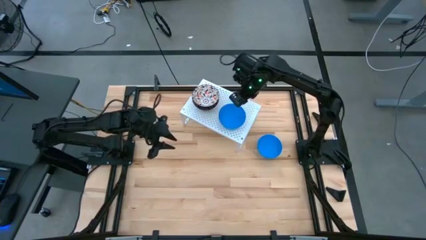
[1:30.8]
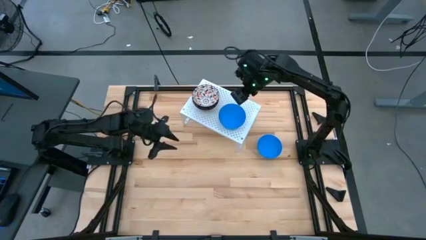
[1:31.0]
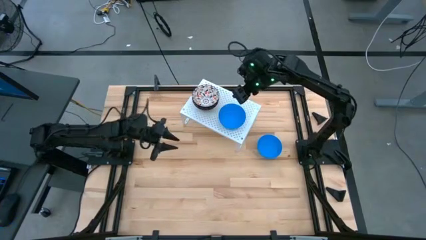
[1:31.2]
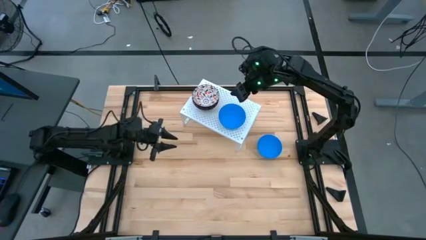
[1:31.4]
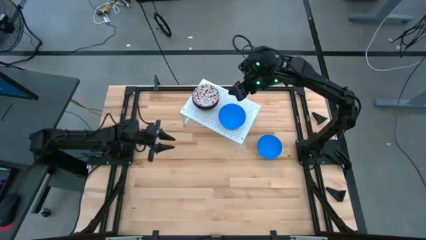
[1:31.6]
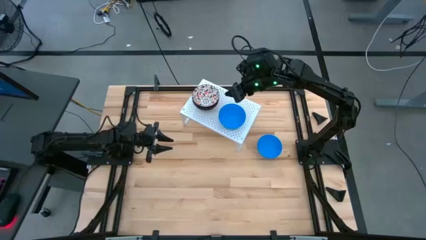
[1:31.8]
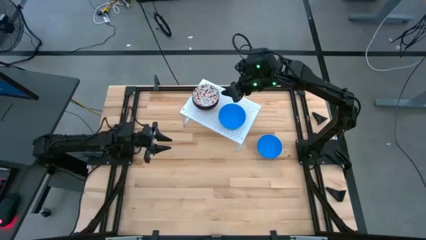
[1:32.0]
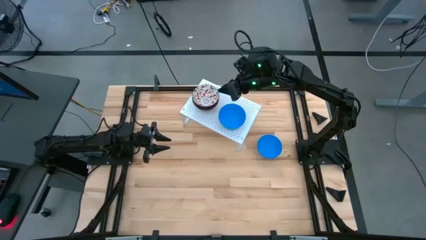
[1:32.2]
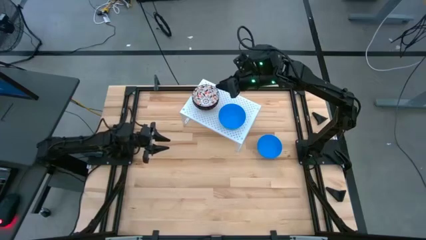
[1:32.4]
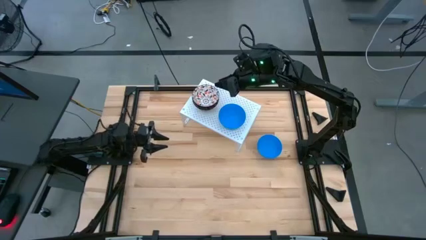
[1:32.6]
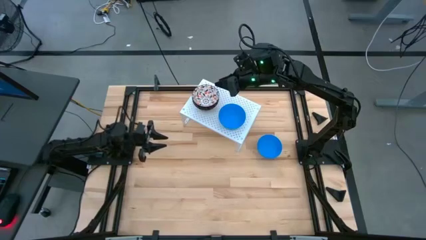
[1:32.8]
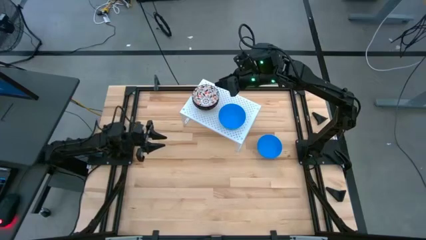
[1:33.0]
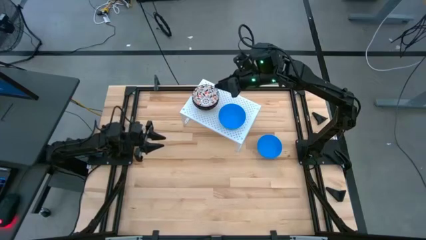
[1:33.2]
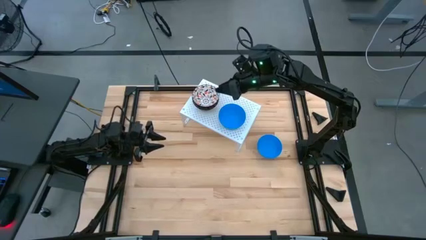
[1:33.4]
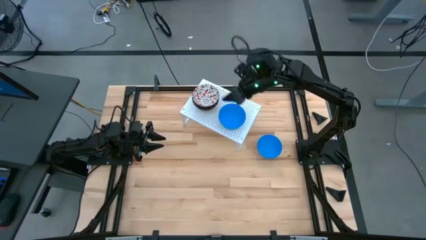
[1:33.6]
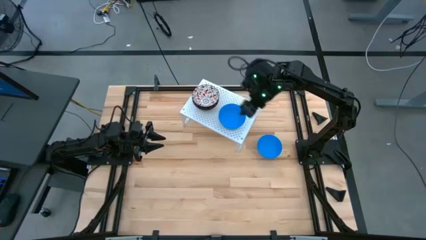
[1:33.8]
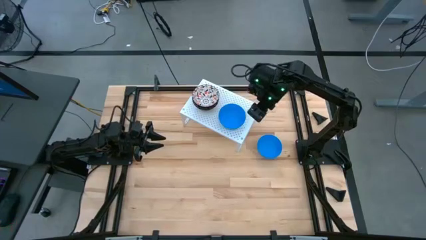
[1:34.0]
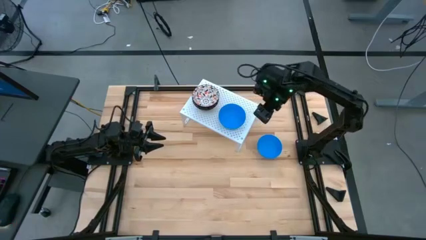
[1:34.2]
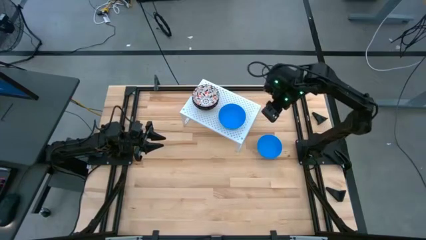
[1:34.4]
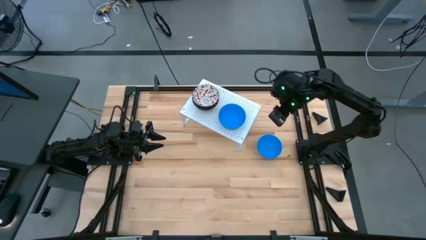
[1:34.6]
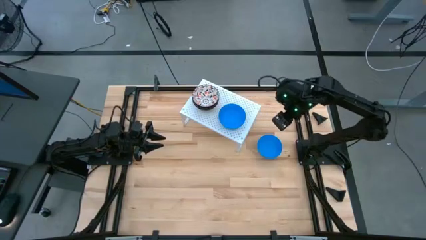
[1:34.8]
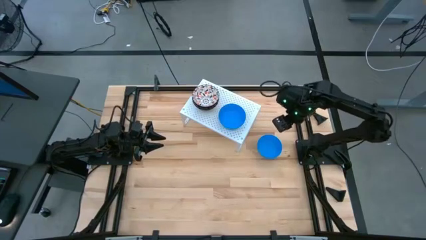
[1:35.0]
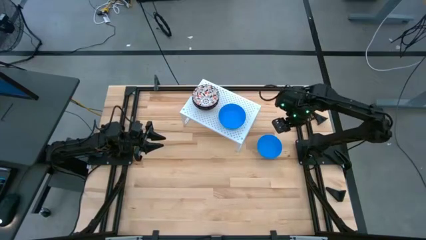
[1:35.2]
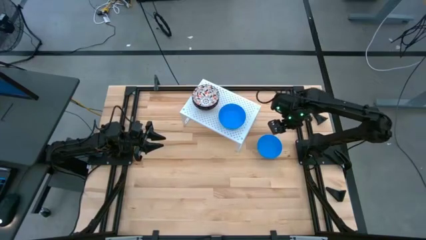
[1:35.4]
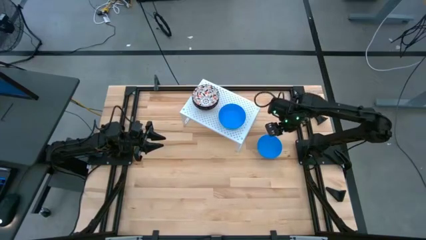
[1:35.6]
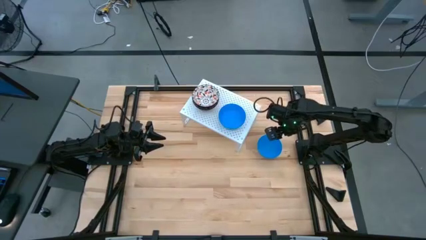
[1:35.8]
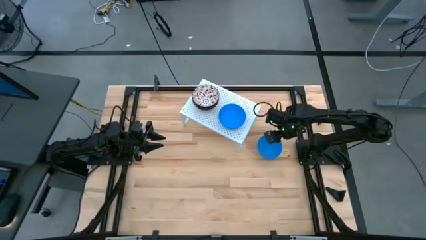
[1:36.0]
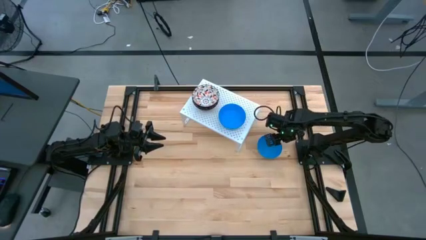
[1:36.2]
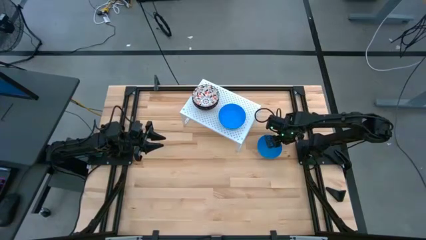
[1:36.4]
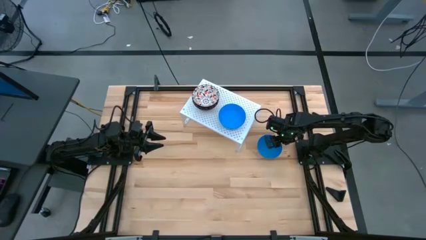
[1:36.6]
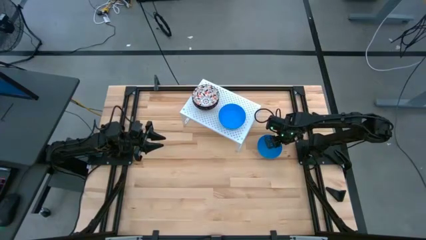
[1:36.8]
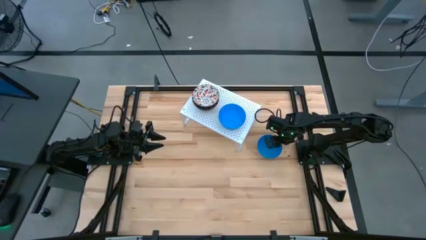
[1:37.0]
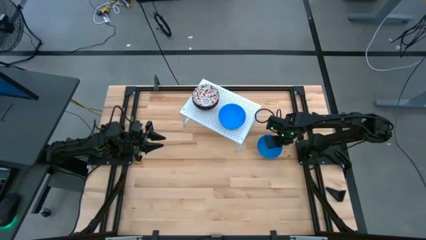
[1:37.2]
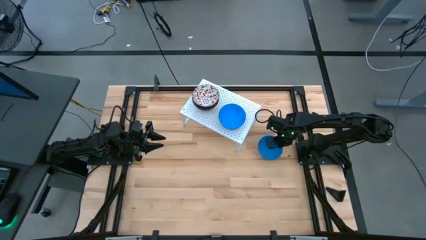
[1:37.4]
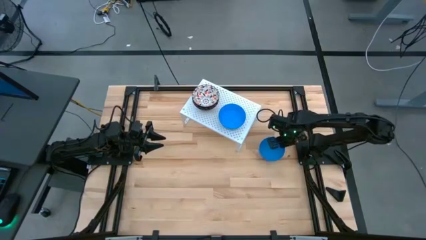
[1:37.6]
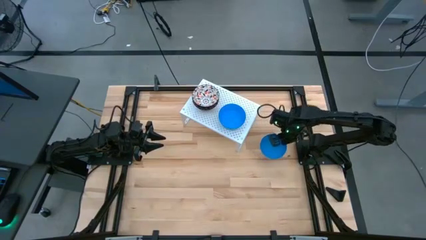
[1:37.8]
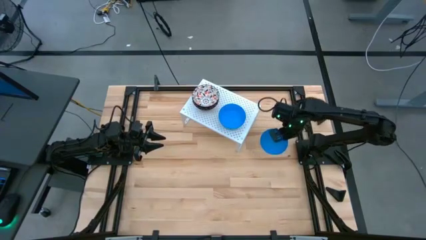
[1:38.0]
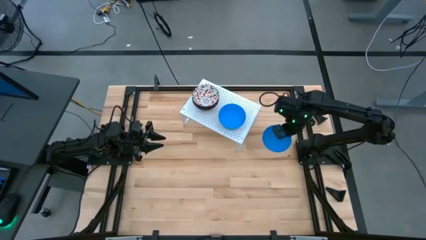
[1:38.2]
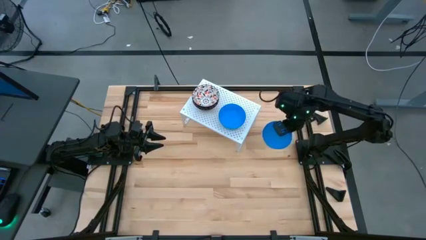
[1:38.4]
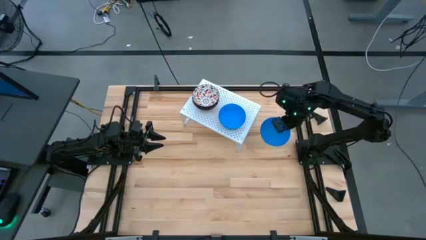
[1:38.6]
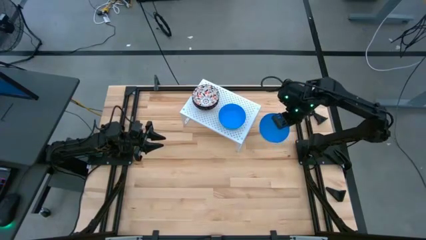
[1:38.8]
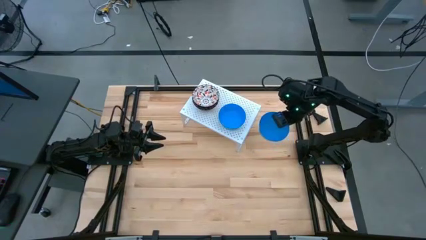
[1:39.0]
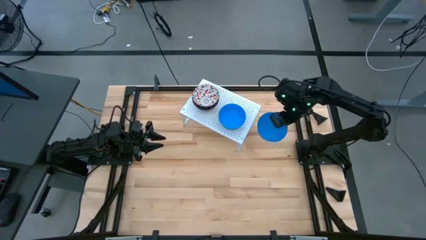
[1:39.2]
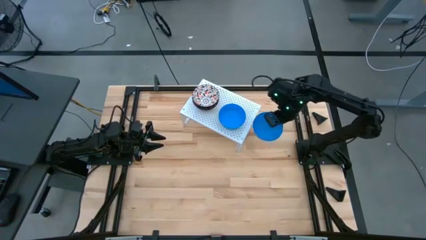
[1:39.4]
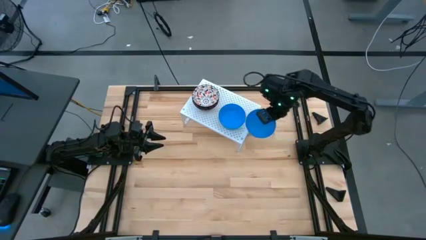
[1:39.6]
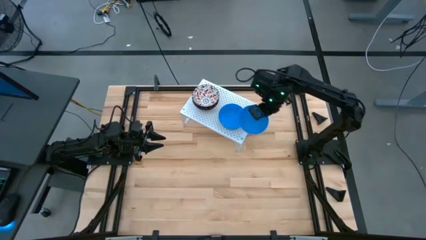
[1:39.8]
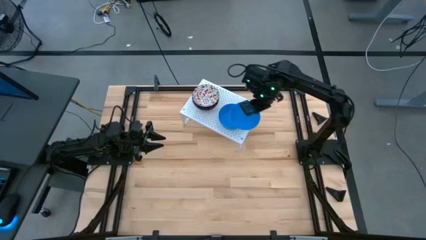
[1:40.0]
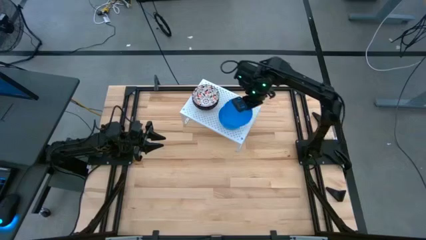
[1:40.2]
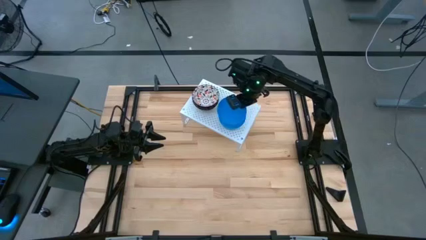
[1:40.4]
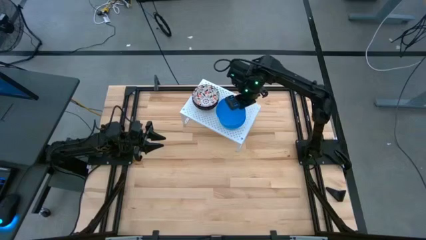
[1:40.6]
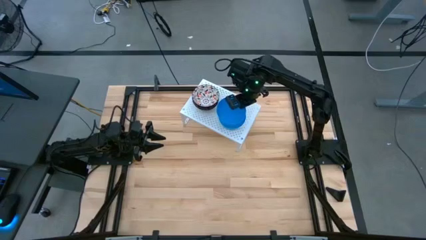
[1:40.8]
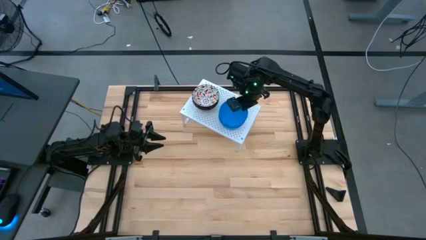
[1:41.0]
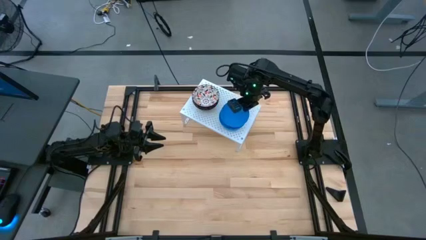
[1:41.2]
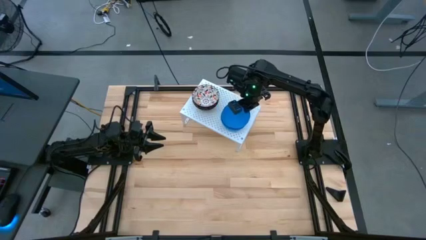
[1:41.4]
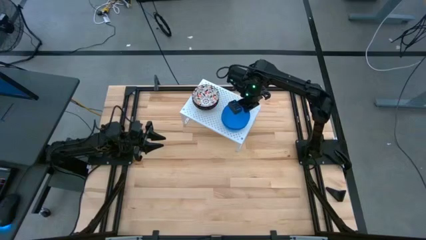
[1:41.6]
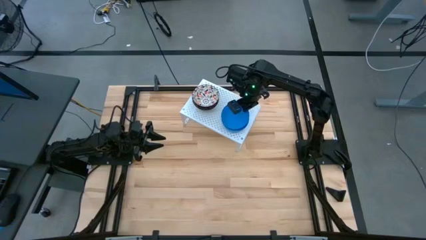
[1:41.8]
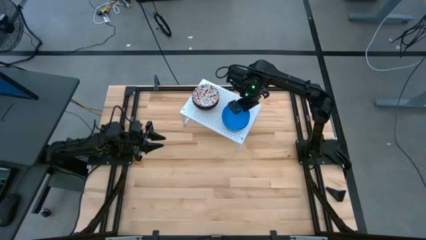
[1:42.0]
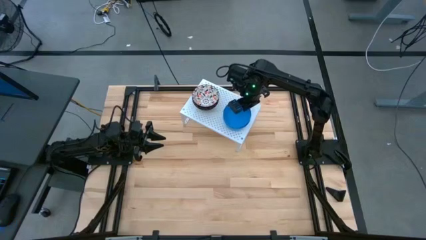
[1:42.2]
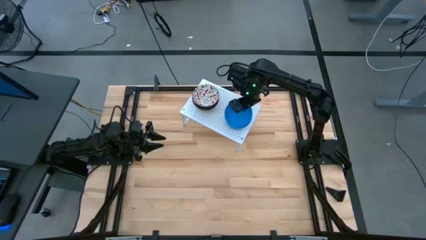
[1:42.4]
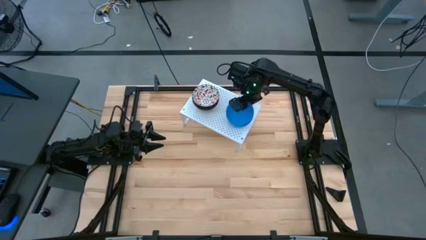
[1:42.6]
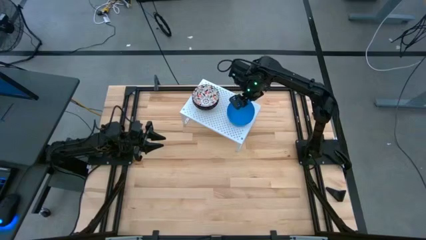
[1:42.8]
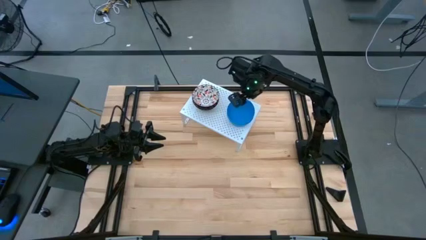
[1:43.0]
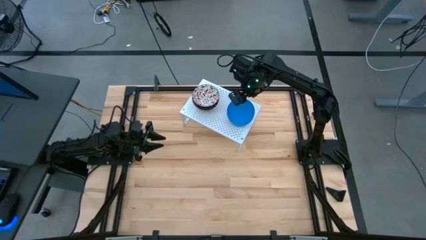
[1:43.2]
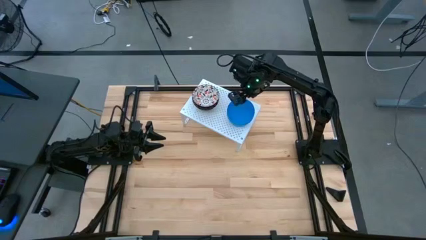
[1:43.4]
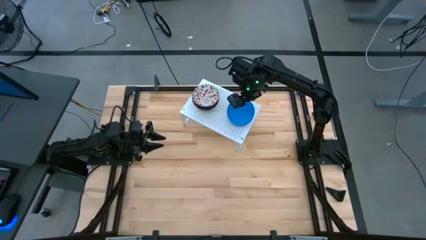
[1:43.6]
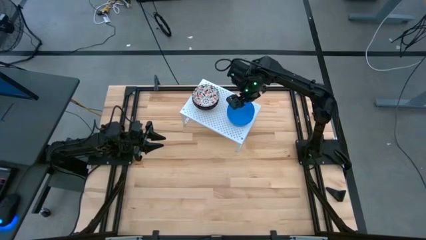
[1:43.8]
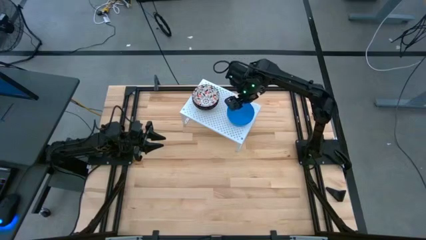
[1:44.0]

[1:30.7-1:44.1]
Task: Pick & Place Mini bowls
Stack the blue bowl on top of the other blue bowls on the shelf

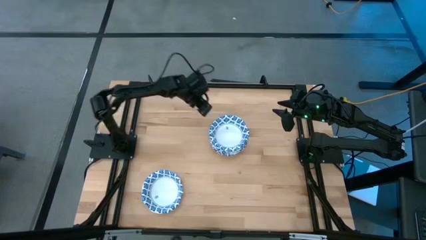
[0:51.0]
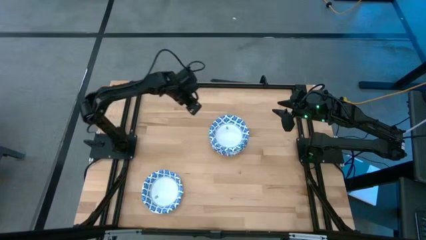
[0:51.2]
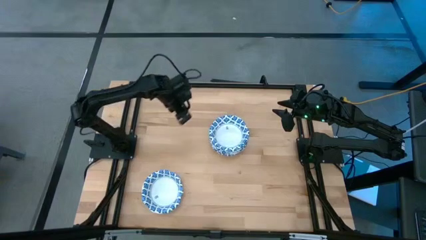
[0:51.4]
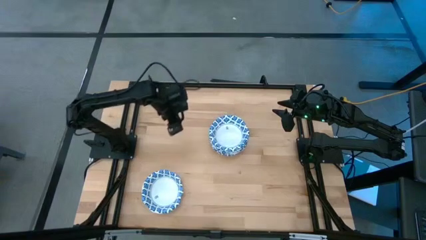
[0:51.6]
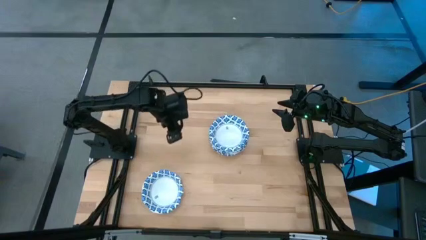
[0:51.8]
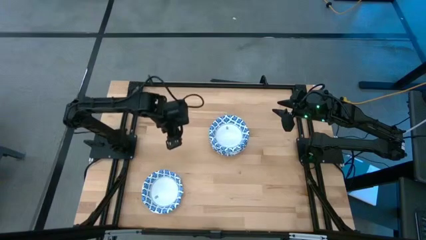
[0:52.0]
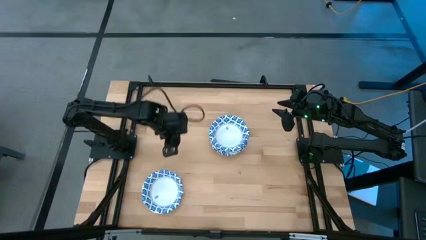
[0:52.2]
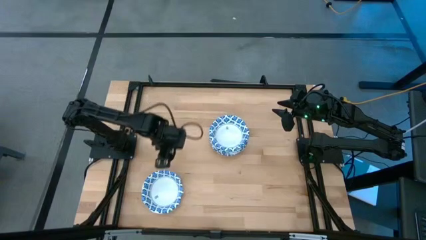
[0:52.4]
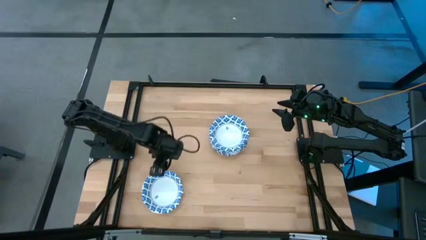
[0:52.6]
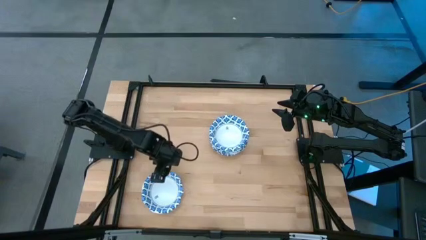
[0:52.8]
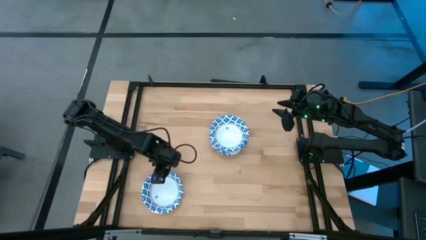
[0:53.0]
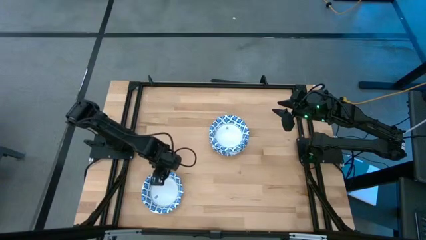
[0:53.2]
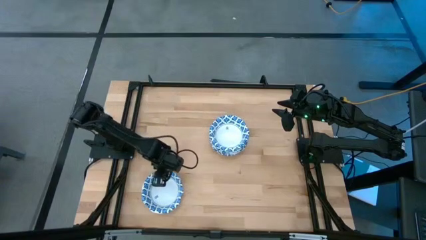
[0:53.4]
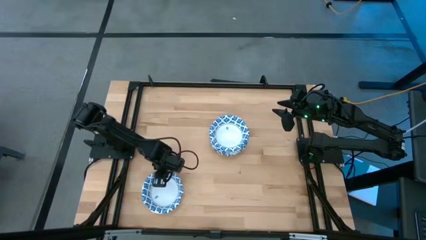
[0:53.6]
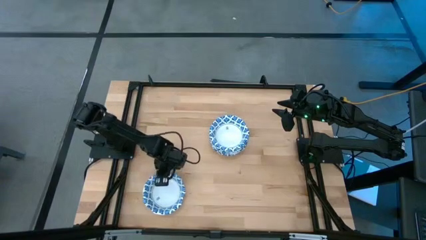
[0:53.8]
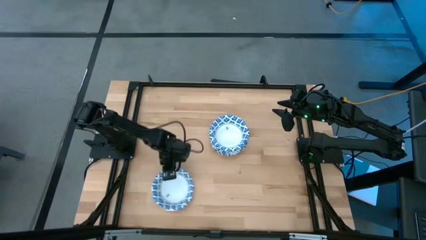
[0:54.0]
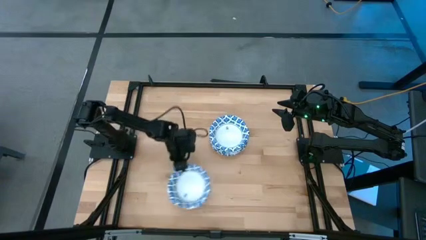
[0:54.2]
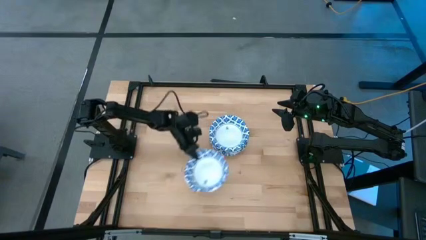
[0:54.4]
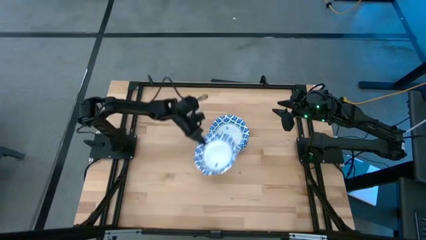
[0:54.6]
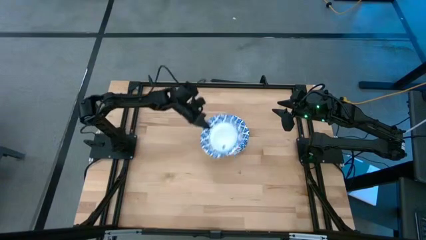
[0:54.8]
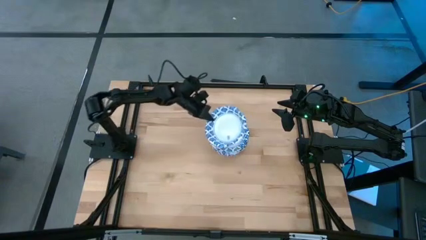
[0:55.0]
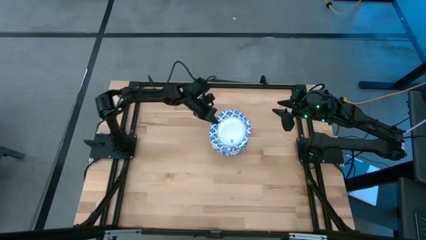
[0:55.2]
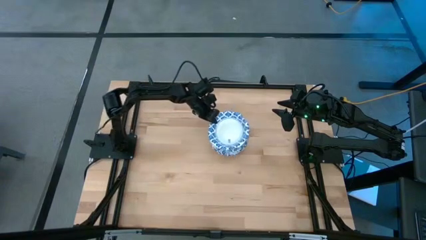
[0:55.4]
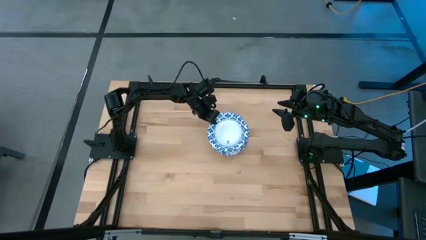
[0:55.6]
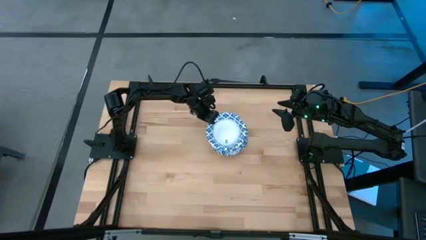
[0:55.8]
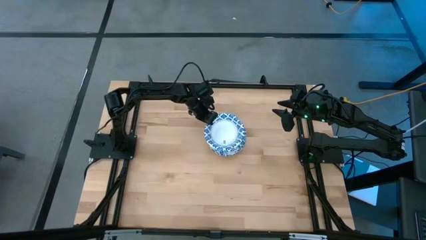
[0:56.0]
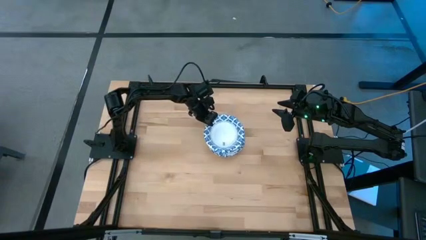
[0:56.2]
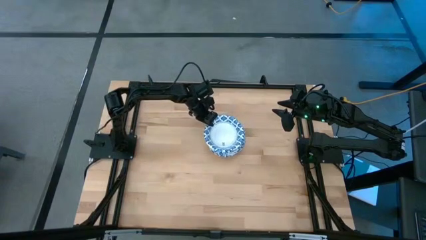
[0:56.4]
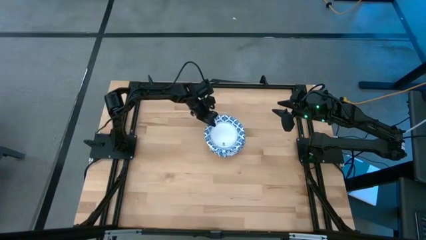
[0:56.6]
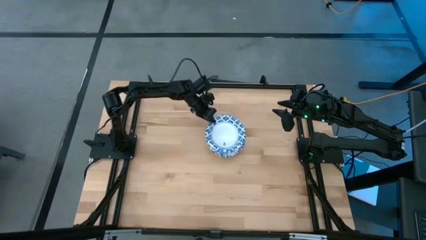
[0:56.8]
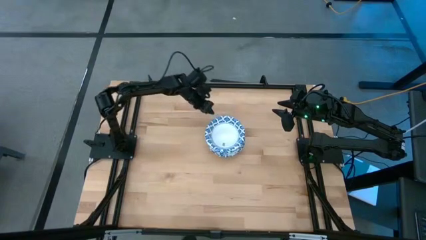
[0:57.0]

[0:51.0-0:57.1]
Task: Nest bowls inside each other
Stack the white bowl on top of the white bowl
